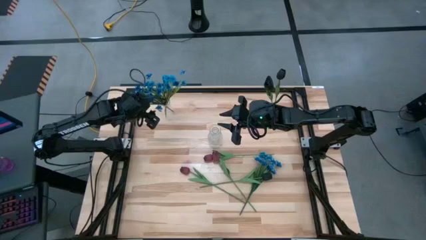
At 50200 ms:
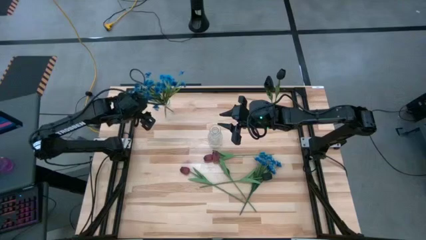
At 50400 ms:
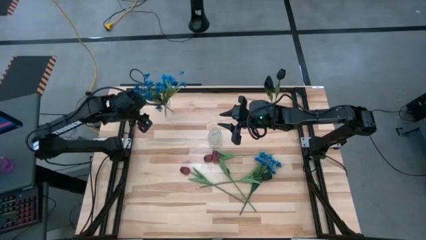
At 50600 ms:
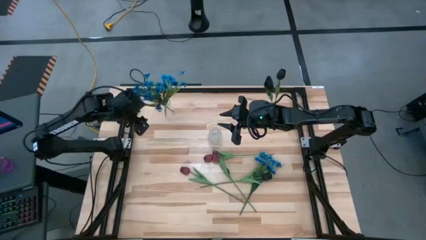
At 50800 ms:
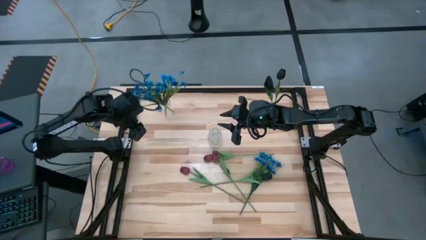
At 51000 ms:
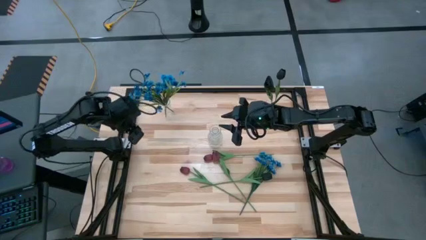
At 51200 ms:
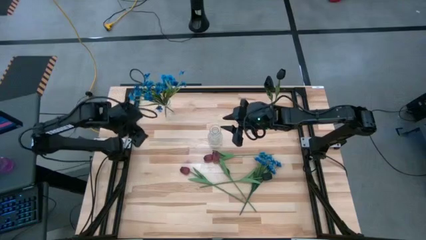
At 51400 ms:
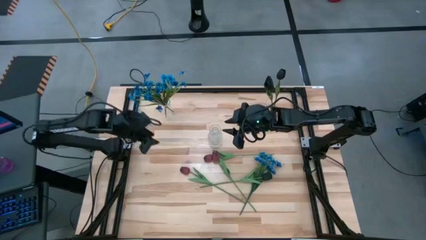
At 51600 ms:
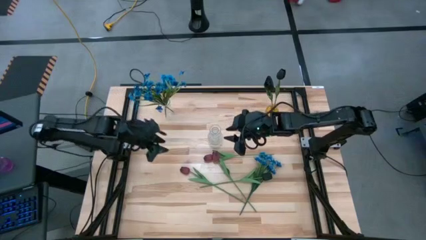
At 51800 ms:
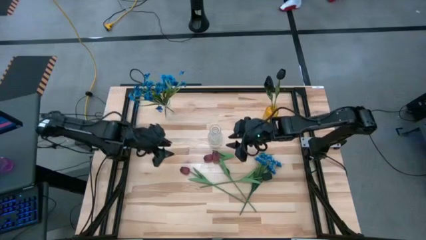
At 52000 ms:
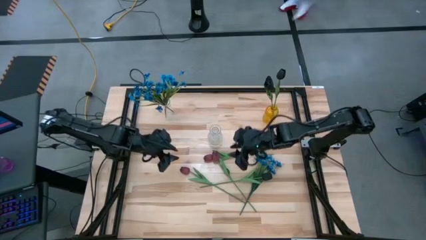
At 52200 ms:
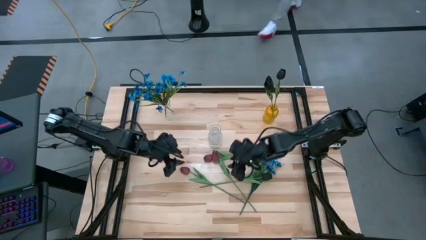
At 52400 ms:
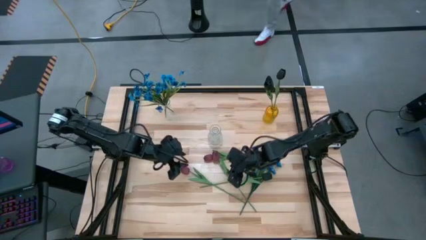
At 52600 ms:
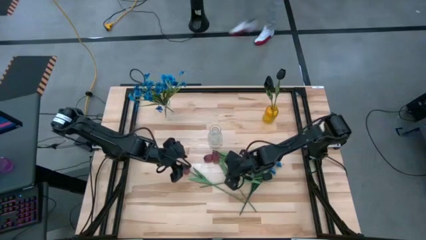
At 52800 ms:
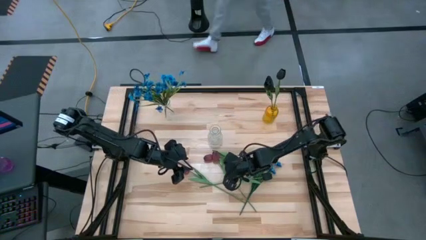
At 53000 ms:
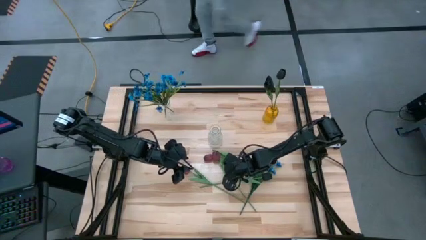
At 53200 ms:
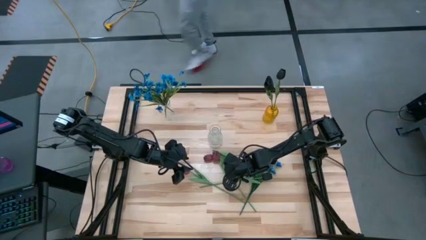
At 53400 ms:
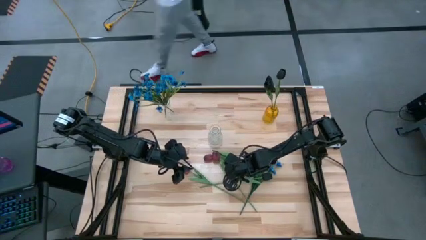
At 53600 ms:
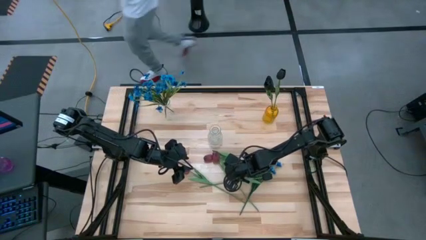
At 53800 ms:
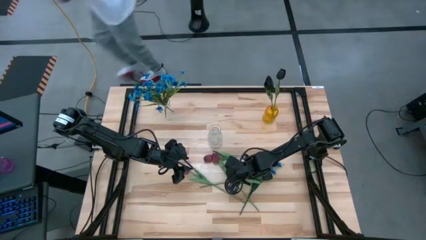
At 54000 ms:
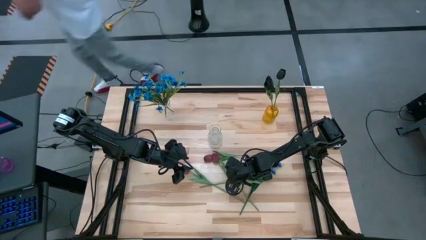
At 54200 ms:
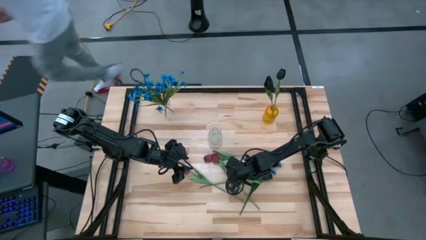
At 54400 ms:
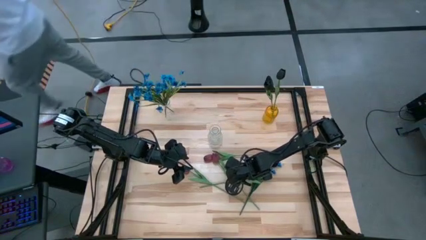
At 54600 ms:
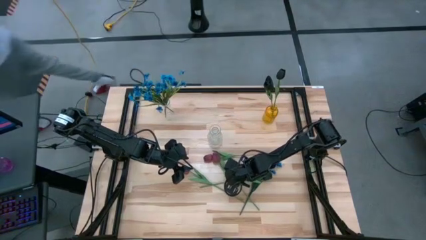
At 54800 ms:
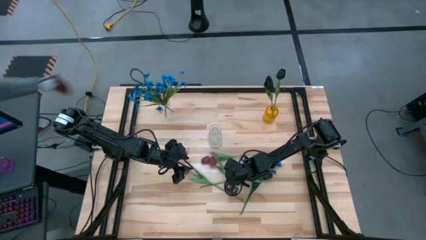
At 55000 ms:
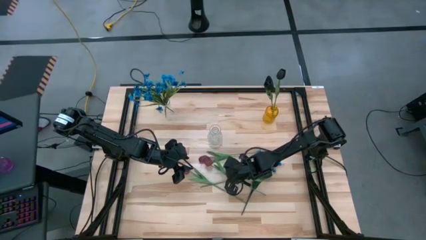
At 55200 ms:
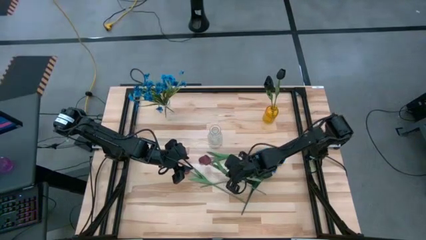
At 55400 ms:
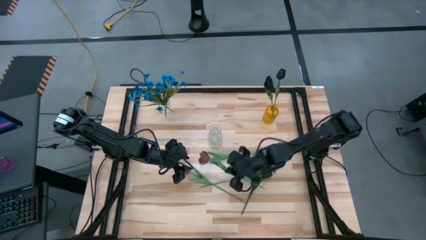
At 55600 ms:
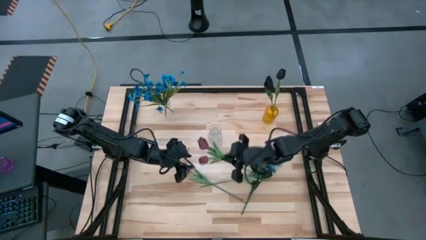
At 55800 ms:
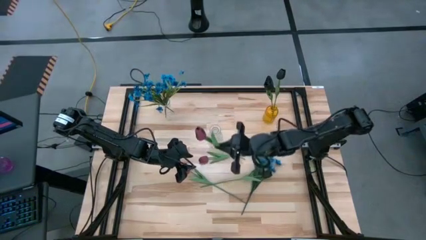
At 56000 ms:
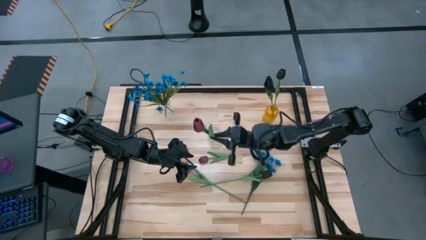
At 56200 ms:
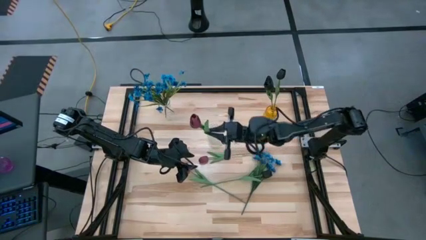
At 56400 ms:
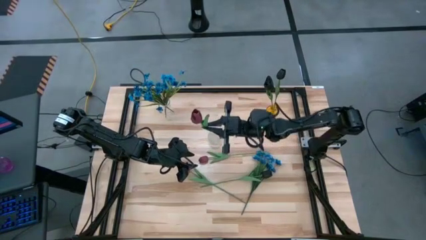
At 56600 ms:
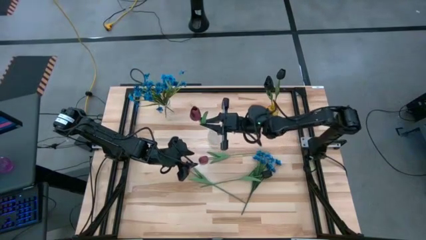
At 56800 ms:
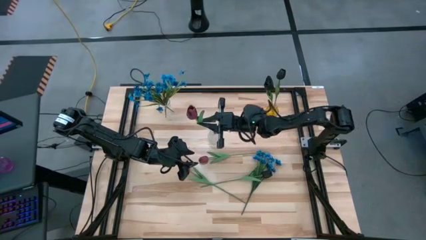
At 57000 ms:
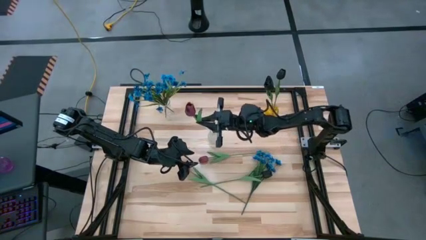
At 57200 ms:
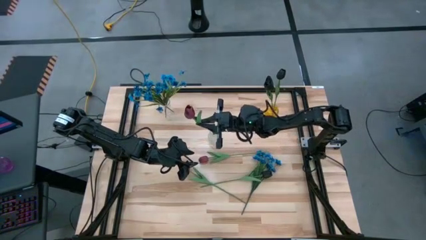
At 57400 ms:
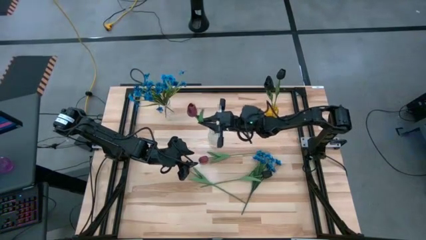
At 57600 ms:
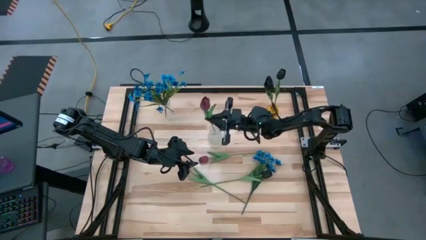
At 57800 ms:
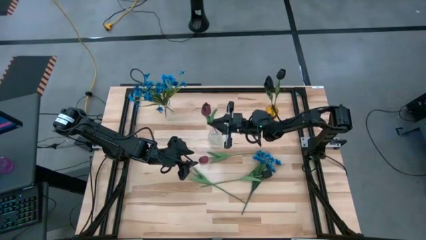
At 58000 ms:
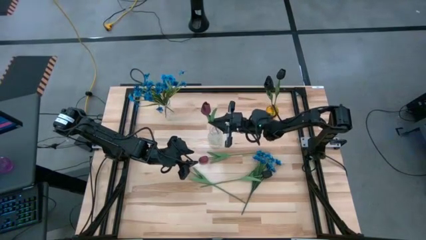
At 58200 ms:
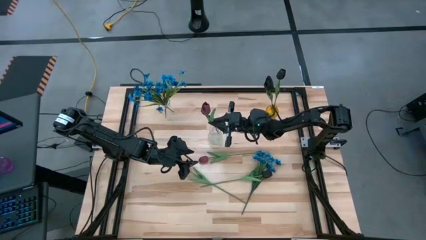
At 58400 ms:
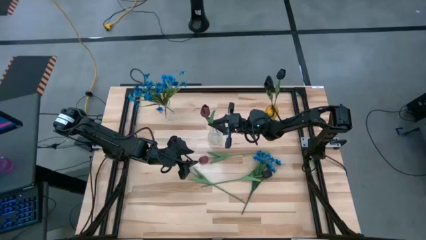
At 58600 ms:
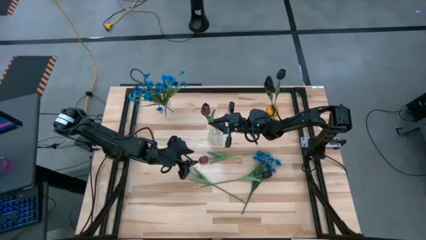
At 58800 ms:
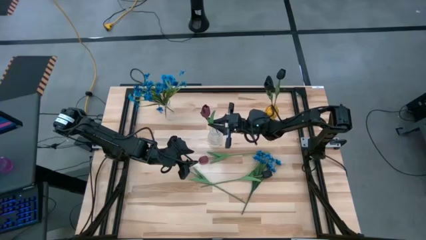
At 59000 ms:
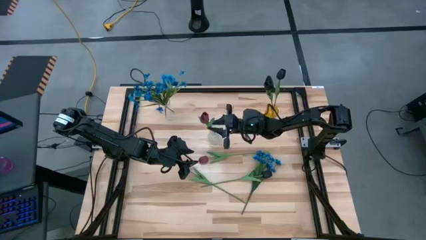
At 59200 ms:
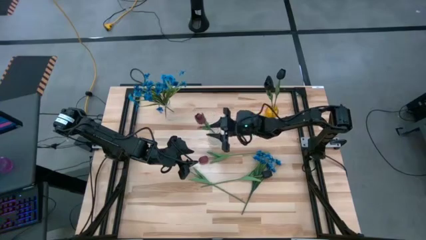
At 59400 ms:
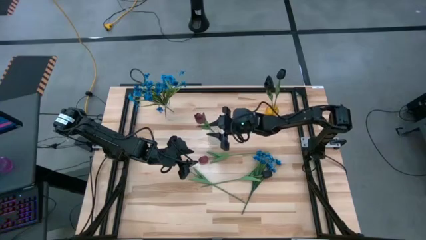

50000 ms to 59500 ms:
Task: Sort flowers into vase by color
Put the red flower into the bottom transparent vase

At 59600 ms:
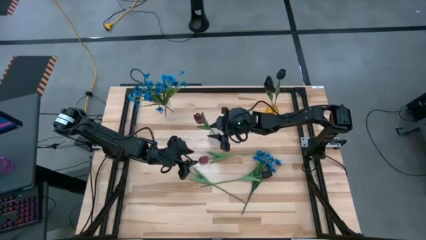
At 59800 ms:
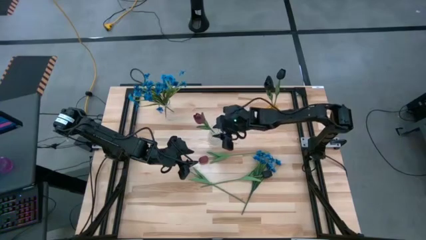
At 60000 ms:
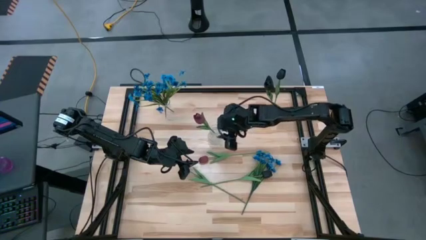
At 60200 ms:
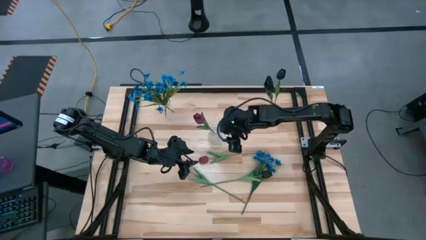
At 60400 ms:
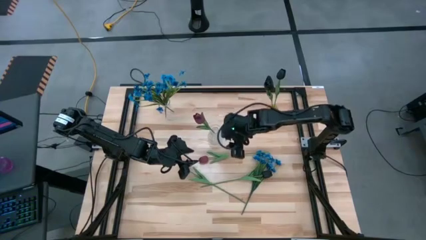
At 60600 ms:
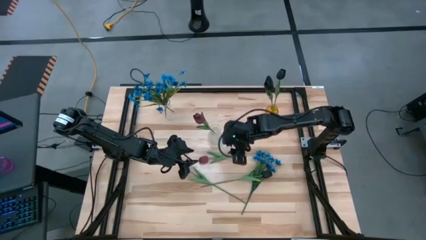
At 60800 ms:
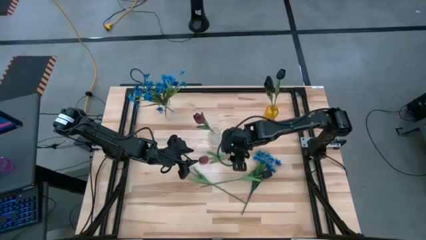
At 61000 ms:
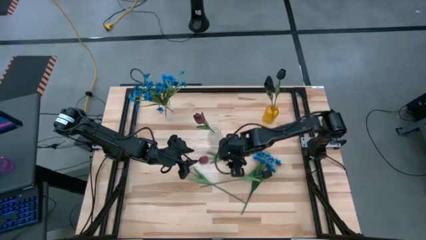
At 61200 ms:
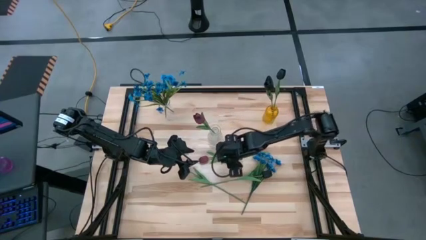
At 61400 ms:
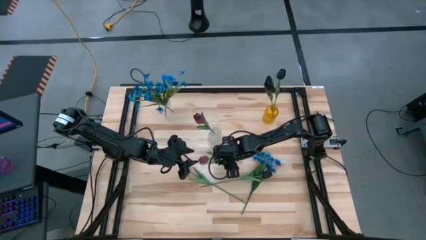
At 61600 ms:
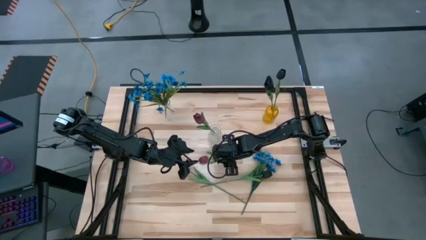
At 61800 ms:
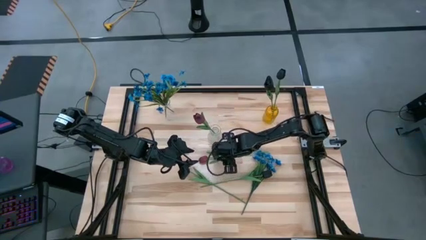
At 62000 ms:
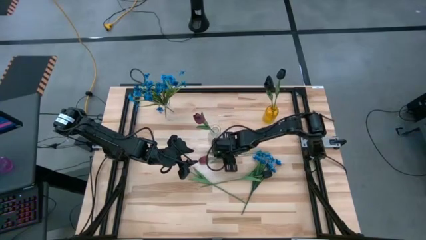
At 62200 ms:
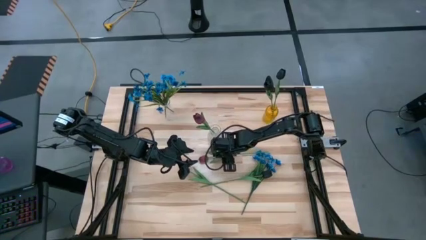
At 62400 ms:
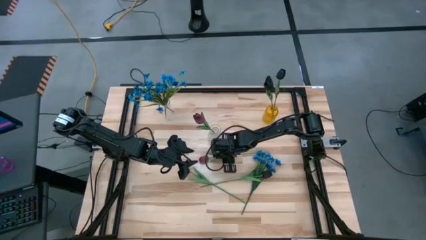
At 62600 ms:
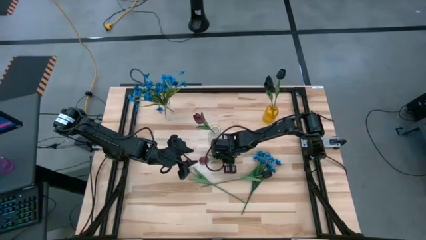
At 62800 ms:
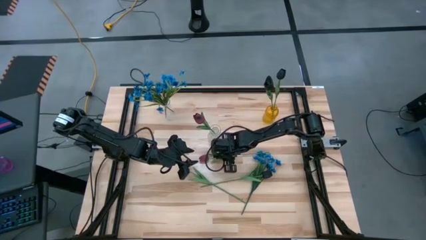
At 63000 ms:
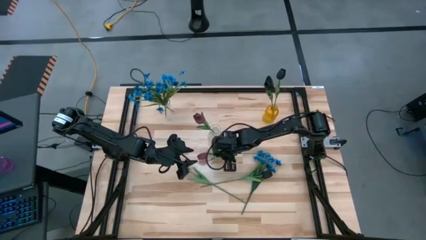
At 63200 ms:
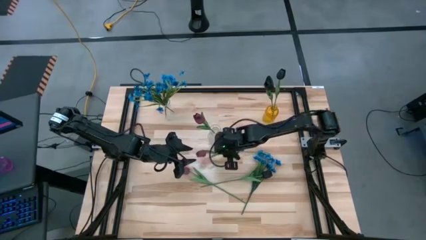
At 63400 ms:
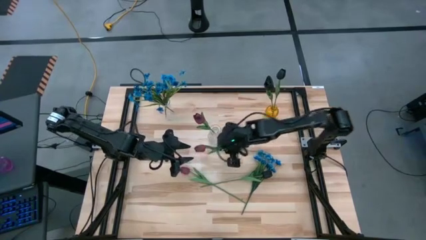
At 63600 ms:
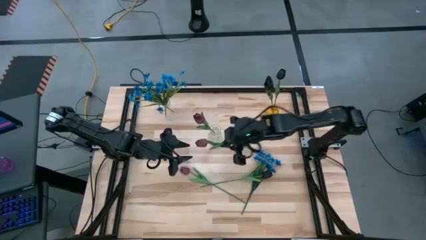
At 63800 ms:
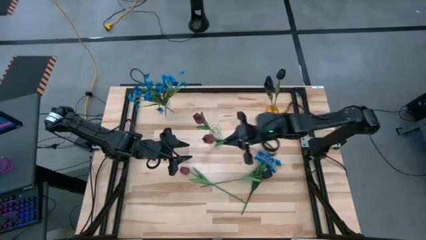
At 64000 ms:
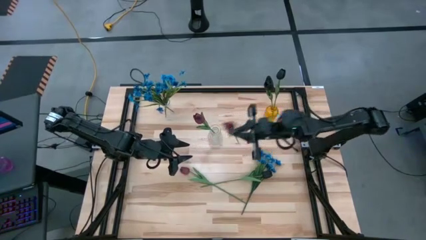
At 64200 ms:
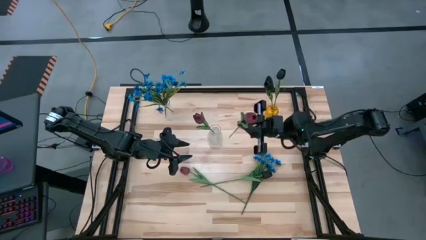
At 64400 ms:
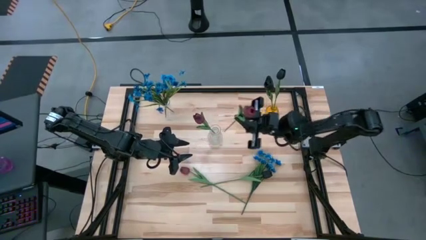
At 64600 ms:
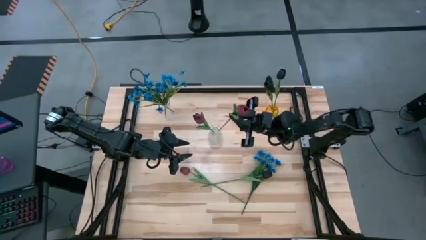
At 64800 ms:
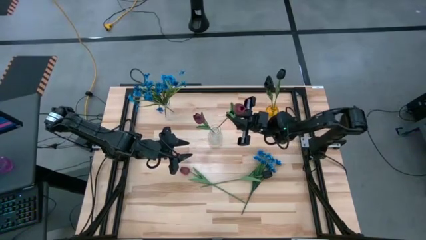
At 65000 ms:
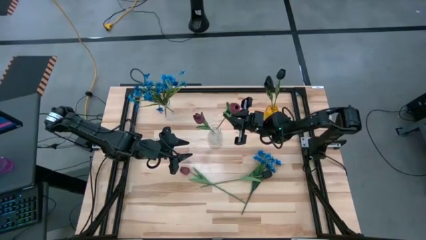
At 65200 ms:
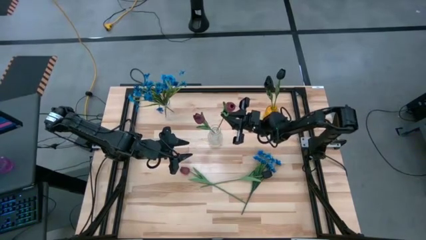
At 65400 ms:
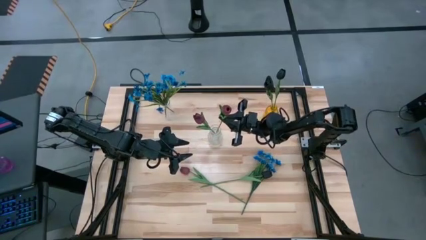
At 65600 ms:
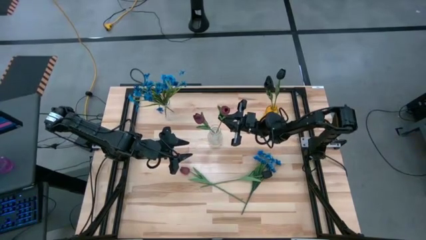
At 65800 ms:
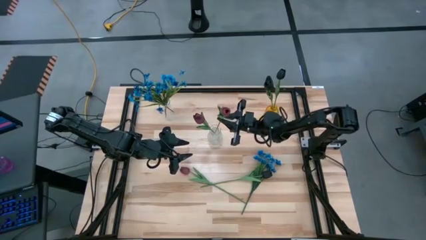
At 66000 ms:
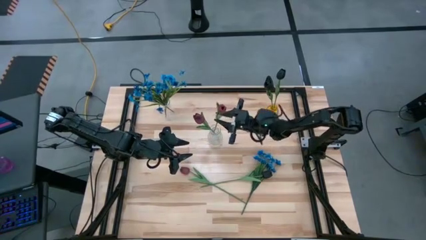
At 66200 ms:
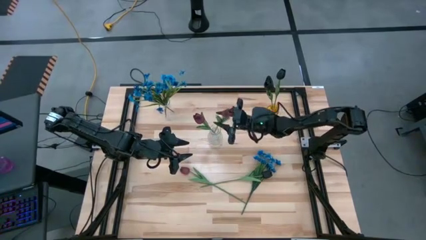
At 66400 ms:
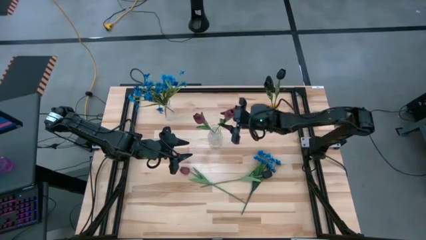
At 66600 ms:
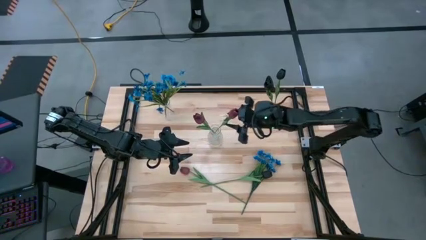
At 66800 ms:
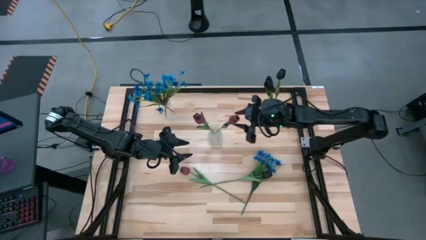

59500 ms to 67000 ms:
Put the top red flower into the bottom transparent vase
